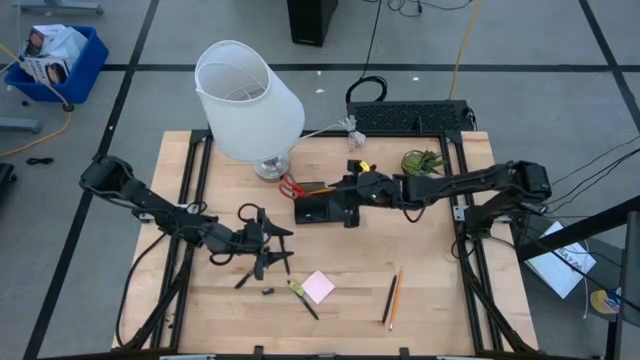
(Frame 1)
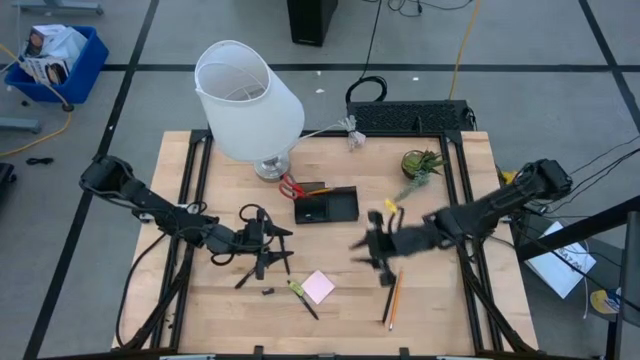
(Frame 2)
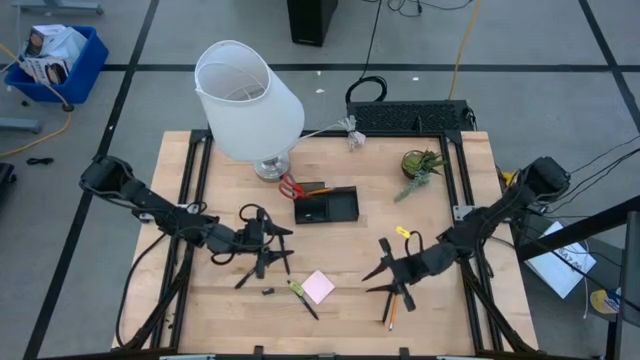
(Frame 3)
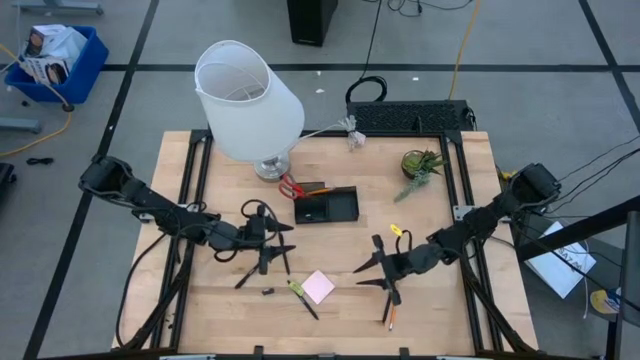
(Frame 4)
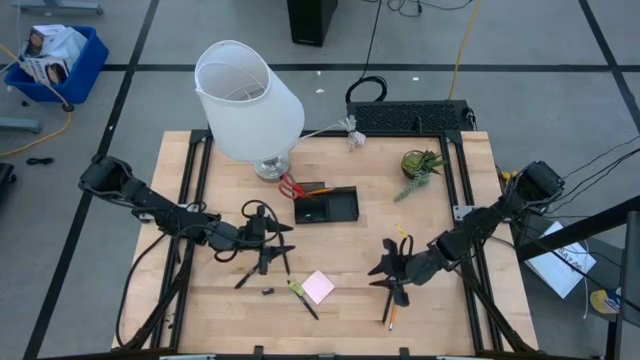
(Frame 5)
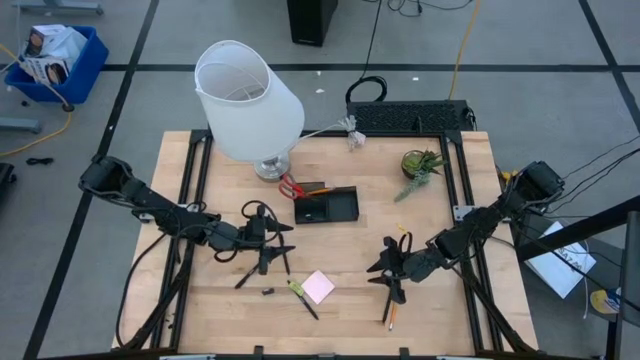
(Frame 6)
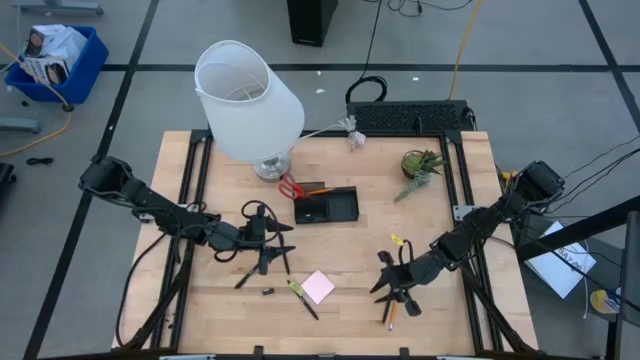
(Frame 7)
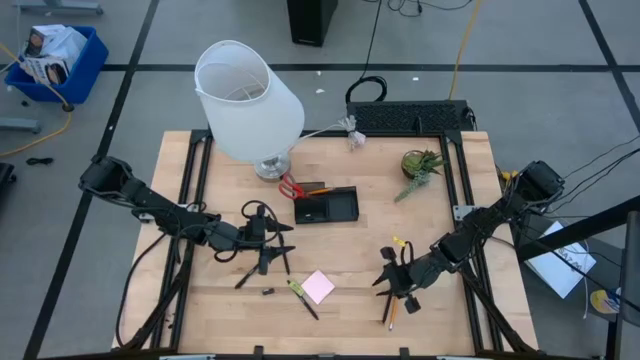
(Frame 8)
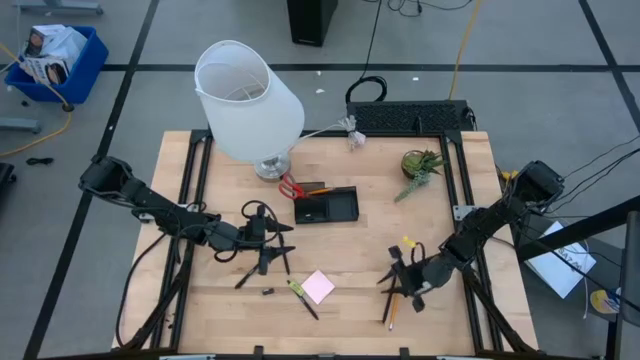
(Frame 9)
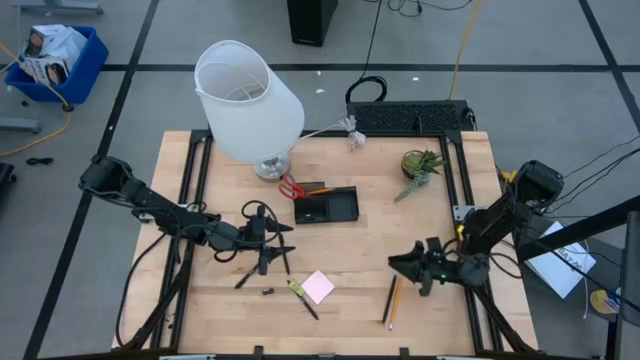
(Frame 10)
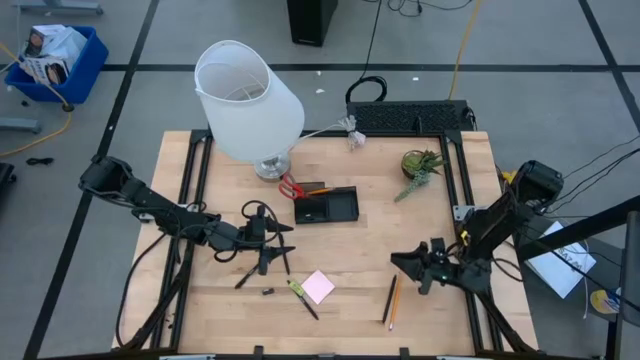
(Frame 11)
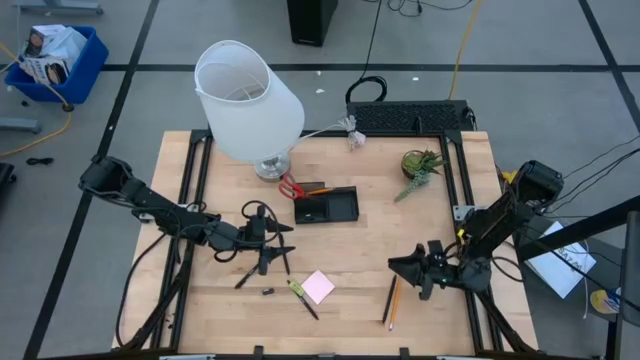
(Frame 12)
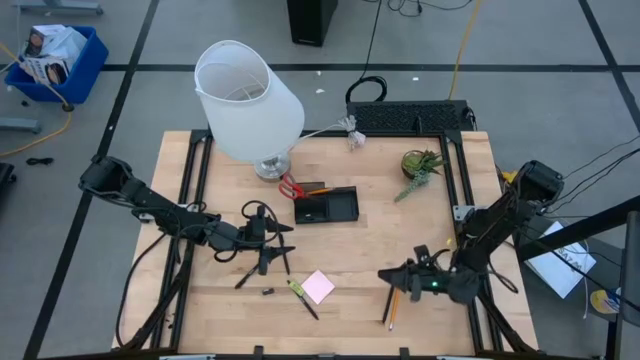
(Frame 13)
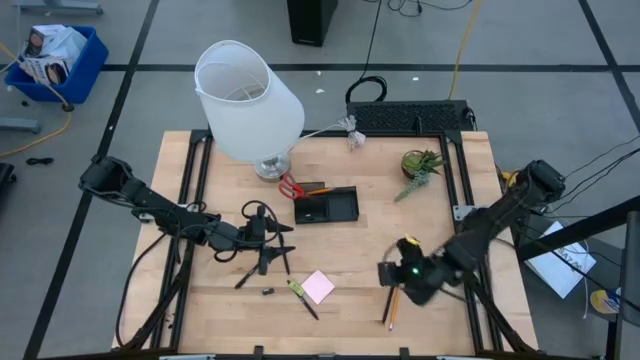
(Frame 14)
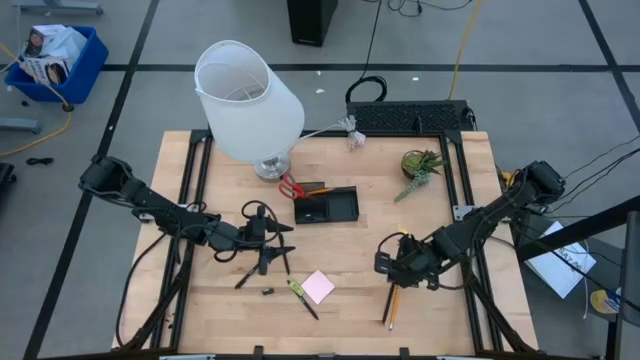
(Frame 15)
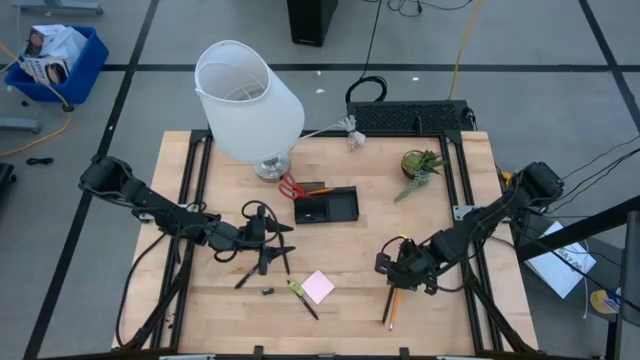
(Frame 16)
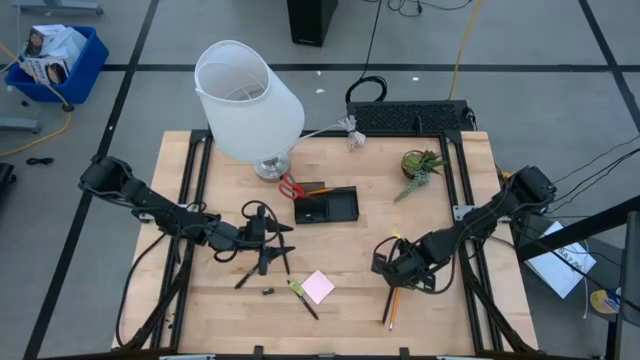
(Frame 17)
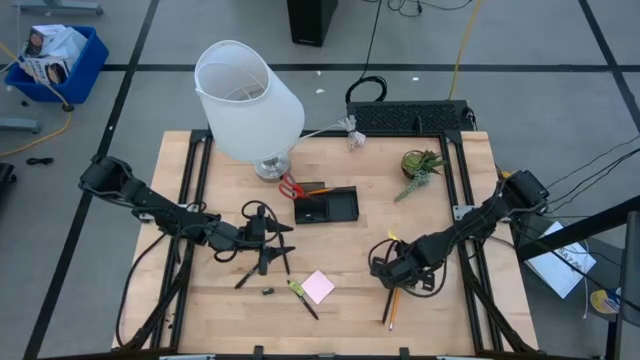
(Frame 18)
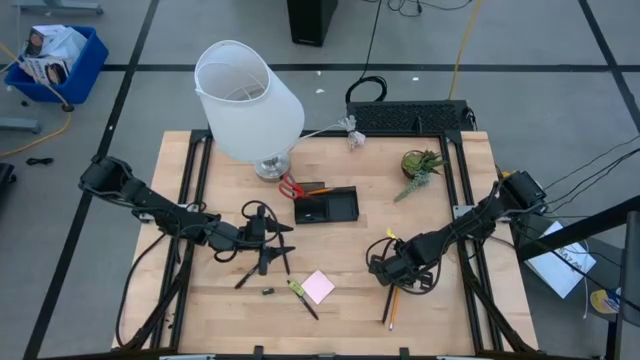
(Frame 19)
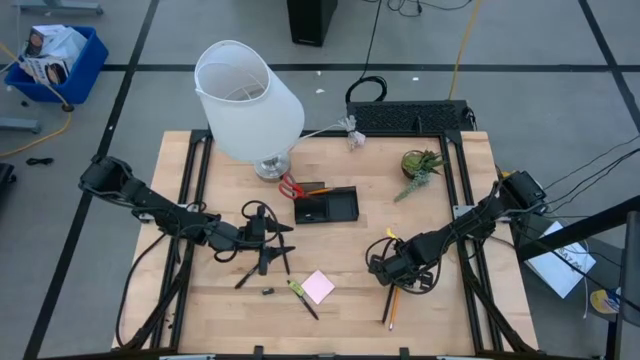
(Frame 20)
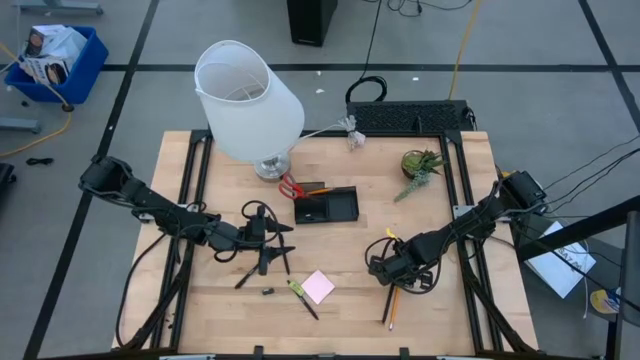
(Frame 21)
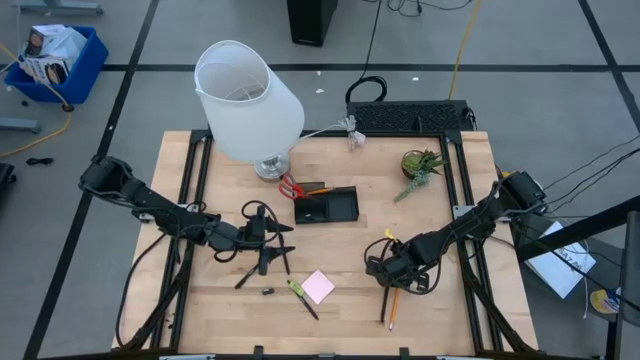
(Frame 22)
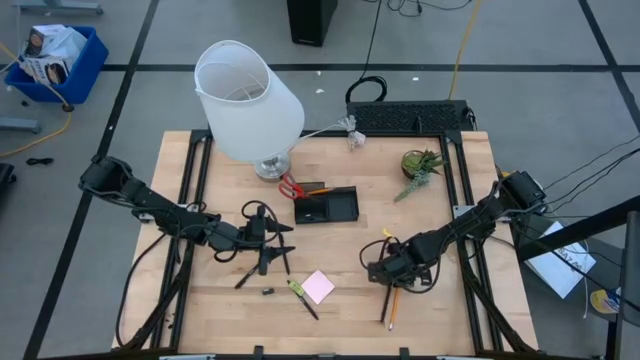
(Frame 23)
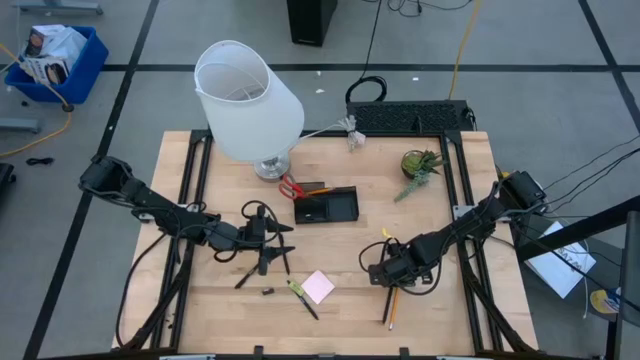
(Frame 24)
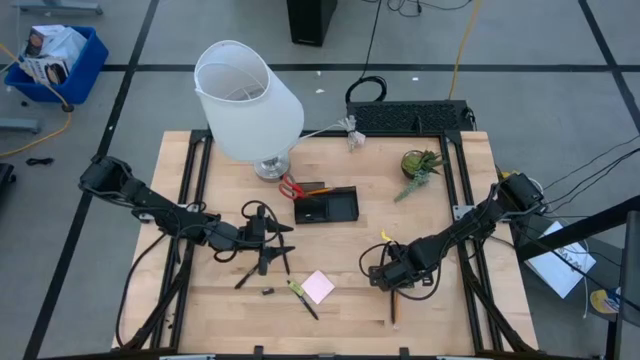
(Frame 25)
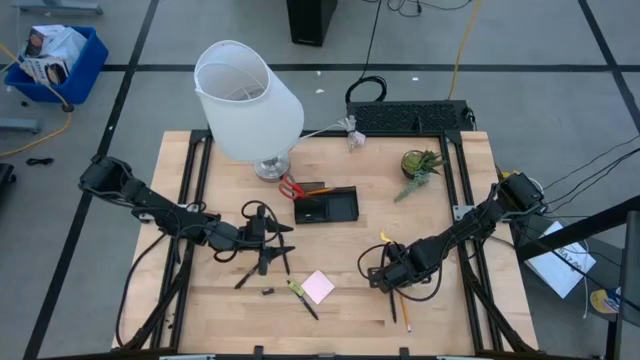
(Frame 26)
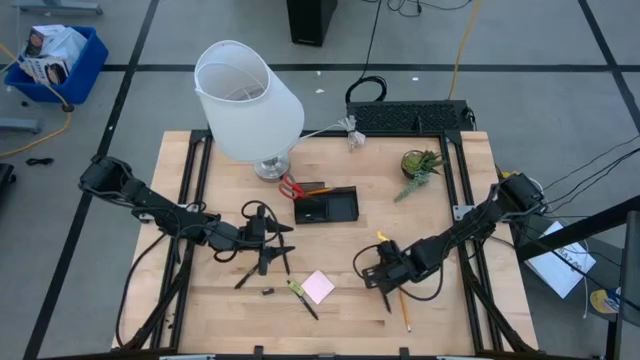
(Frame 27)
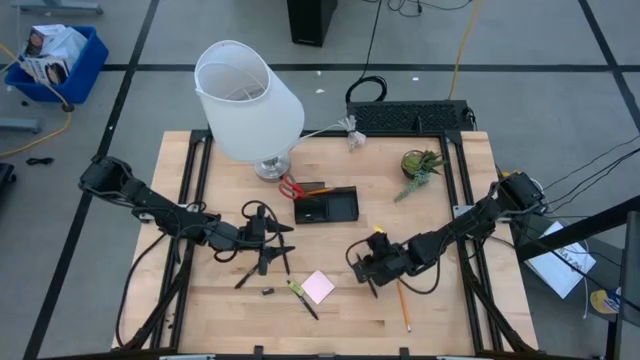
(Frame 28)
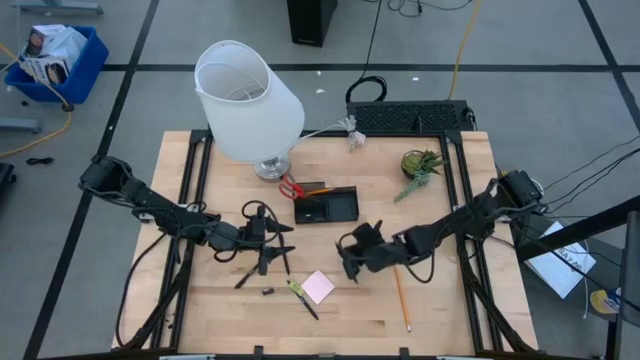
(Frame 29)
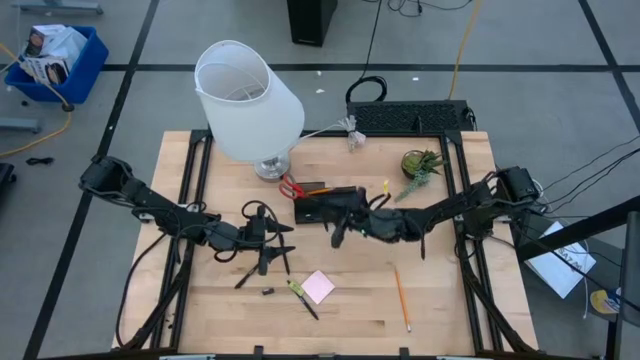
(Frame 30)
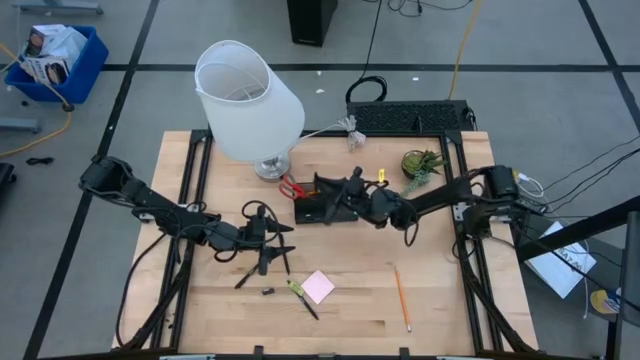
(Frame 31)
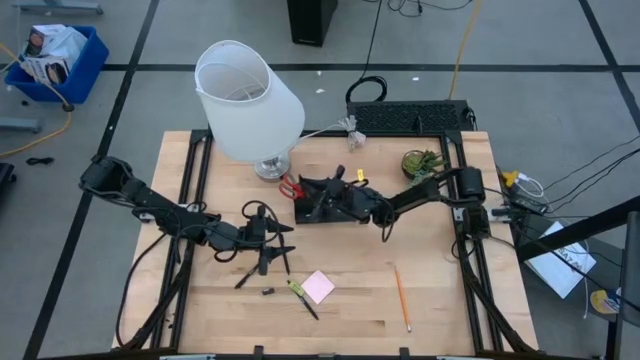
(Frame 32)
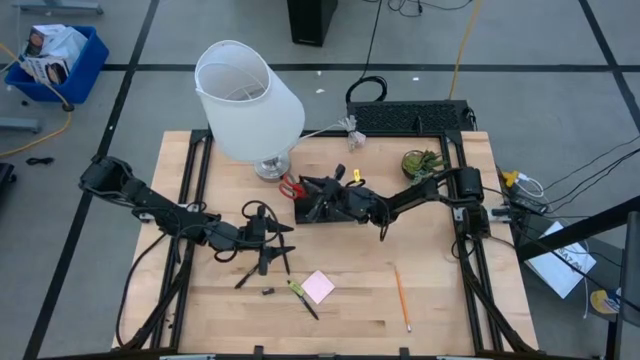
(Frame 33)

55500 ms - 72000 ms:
Task: Pick and place office supplies into organizer
Put the black pen into the top left compartment of the desk organizer

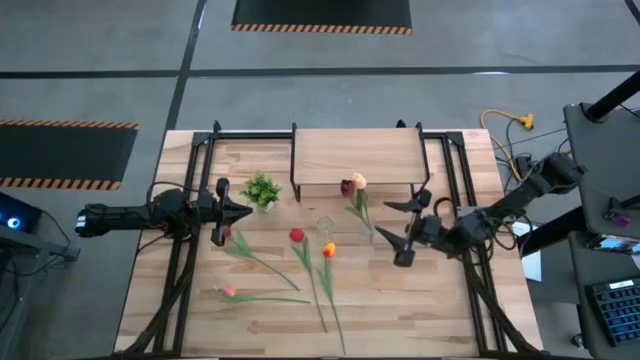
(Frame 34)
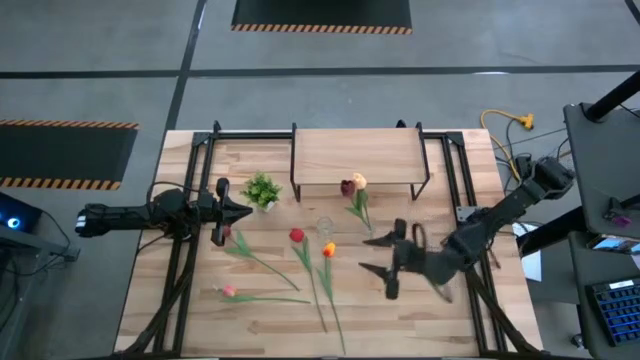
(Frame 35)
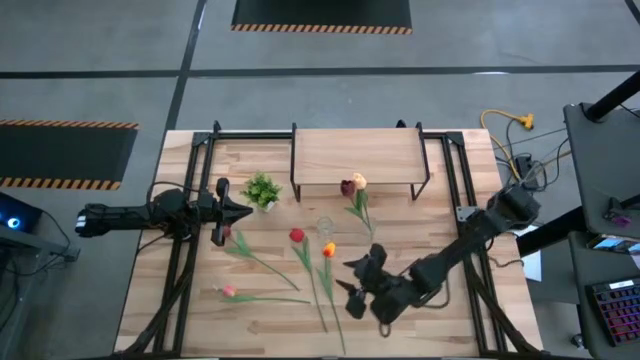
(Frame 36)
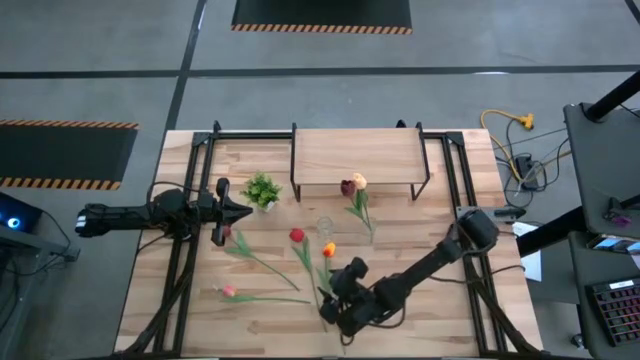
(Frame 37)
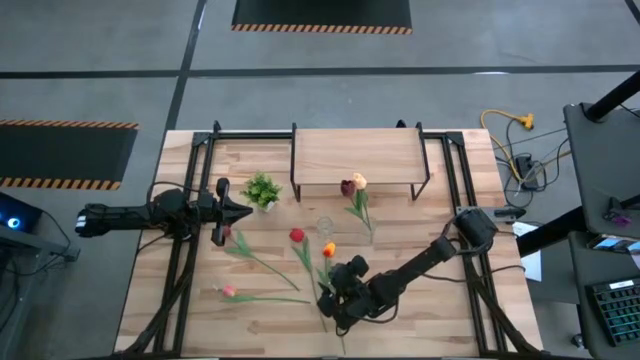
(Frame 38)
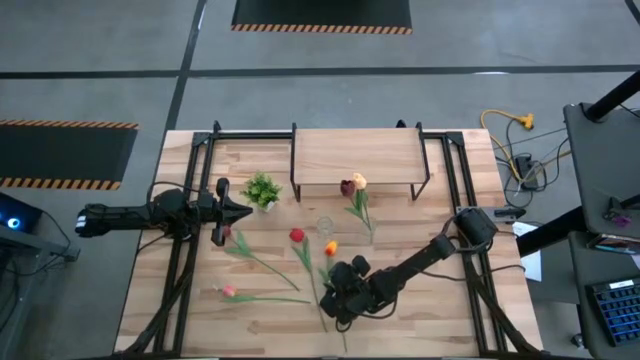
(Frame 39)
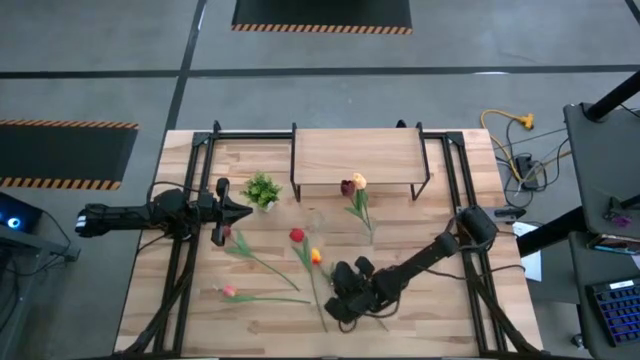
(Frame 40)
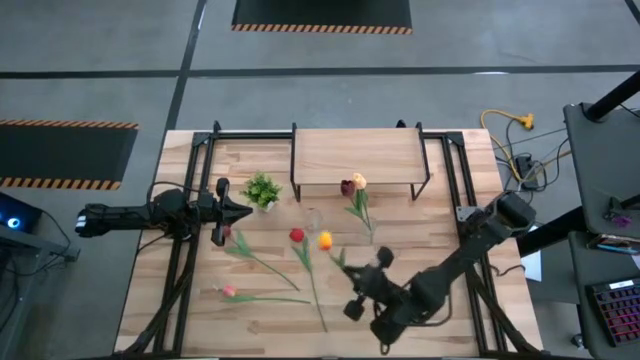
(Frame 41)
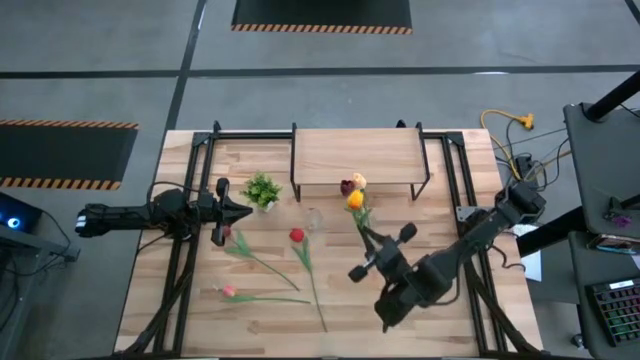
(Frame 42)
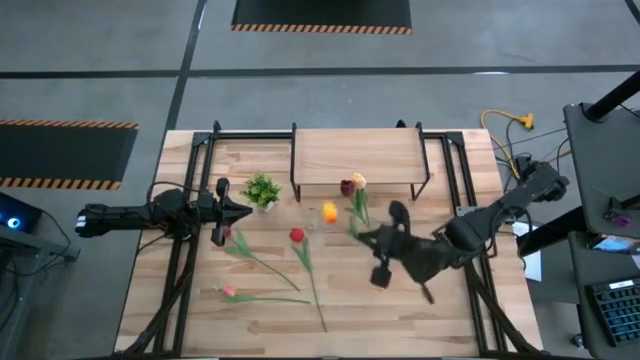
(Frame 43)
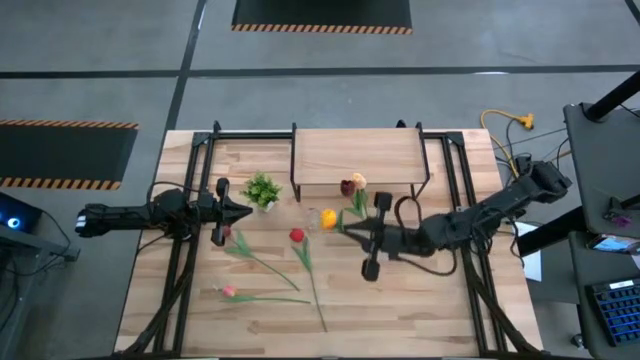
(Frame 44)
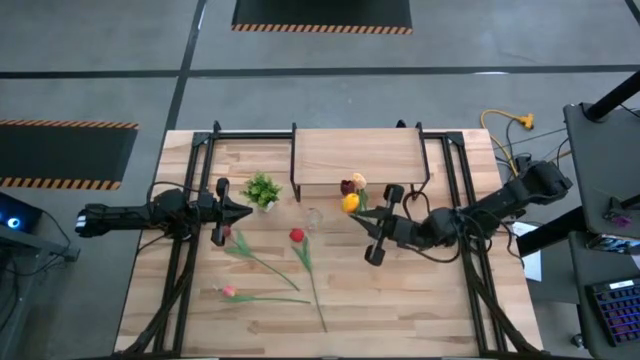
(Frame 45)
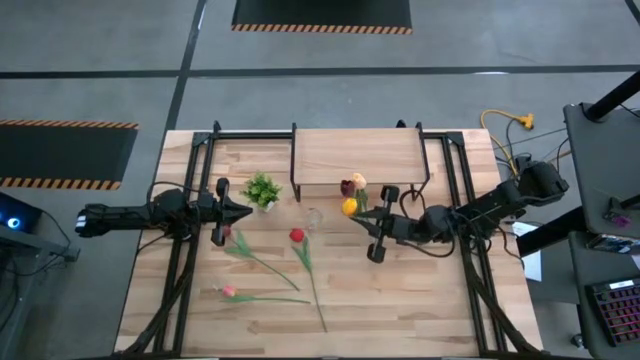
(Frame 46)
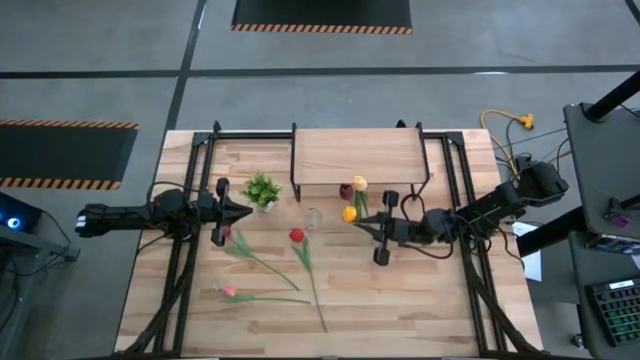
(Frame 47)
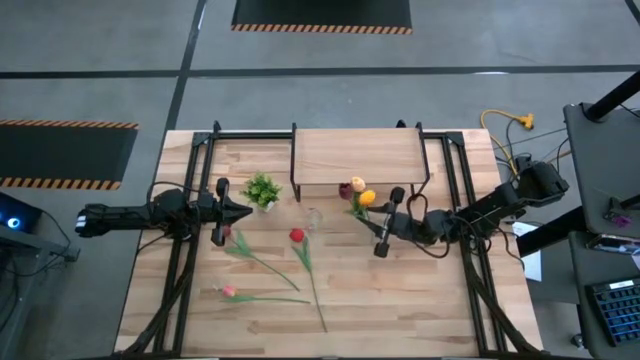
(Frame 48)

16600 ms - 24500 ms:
Task: Pick and place flowers into a vace then onto a shelf
Put the yellow tulip into the right transparent vase
